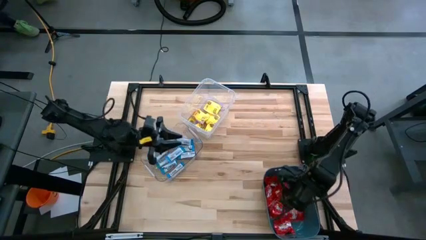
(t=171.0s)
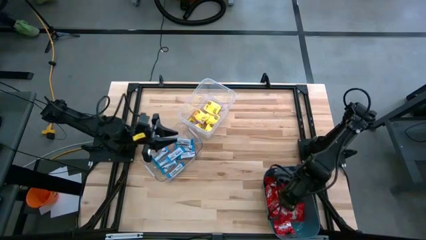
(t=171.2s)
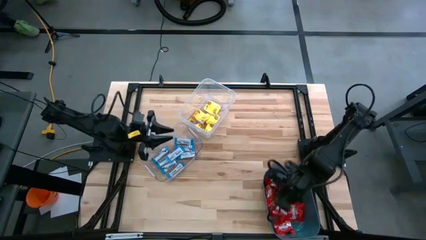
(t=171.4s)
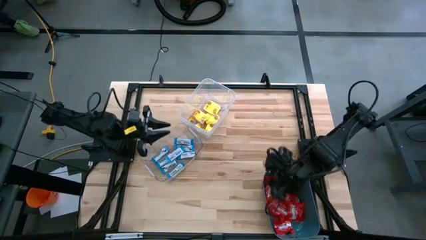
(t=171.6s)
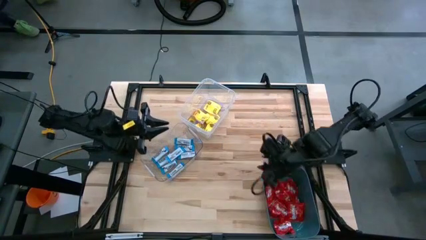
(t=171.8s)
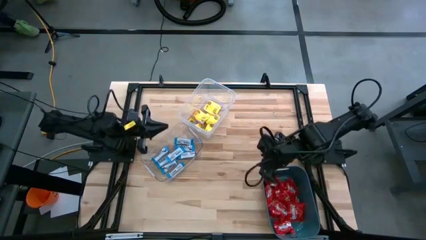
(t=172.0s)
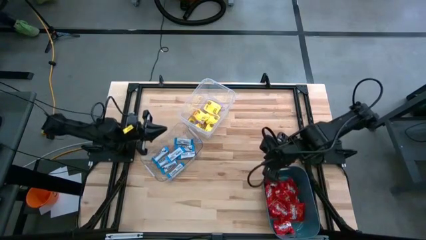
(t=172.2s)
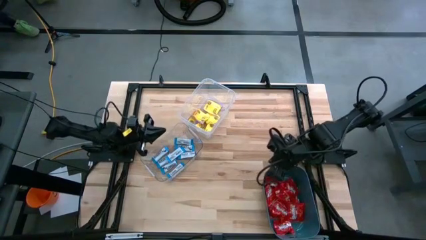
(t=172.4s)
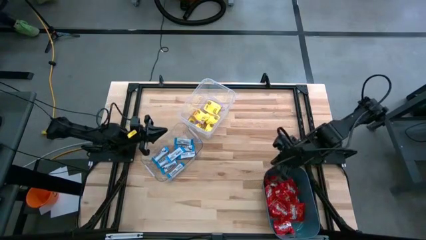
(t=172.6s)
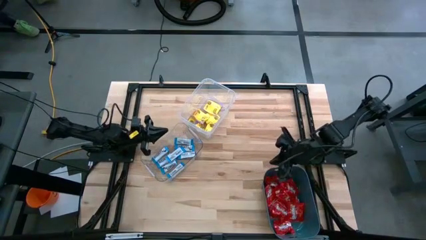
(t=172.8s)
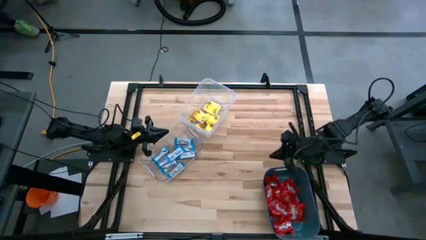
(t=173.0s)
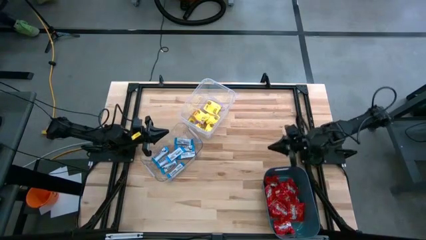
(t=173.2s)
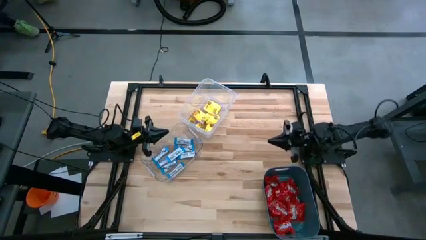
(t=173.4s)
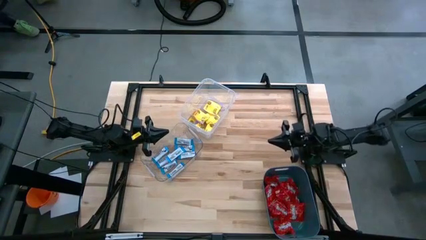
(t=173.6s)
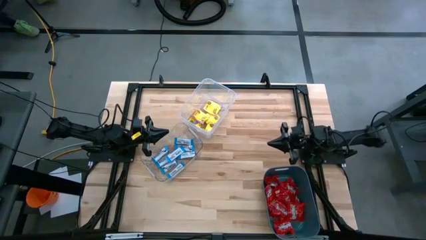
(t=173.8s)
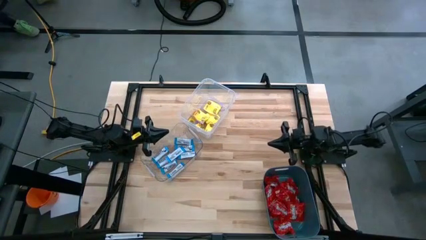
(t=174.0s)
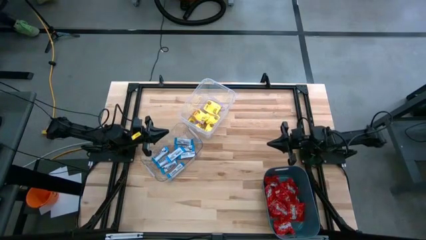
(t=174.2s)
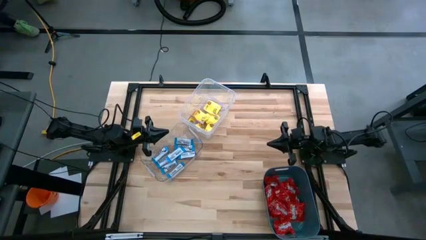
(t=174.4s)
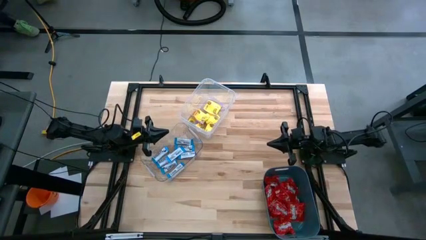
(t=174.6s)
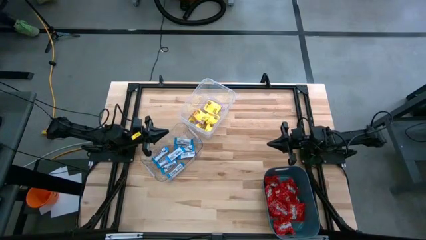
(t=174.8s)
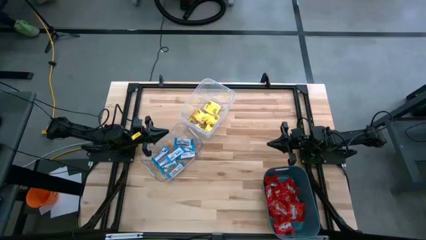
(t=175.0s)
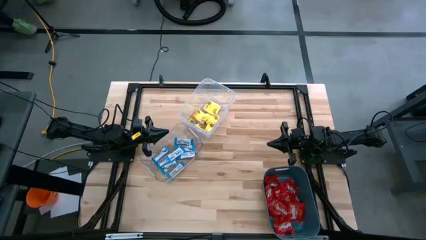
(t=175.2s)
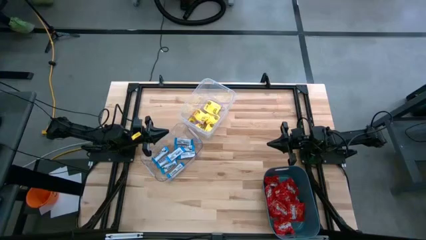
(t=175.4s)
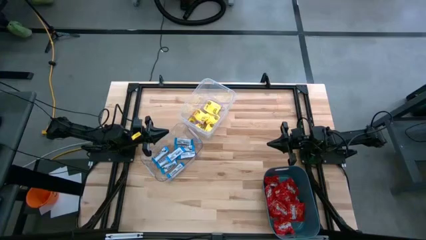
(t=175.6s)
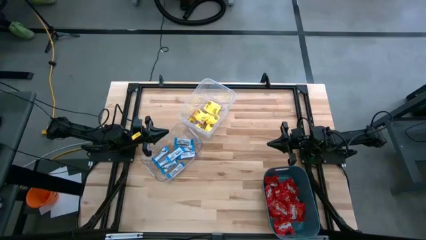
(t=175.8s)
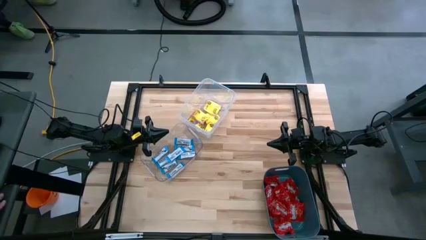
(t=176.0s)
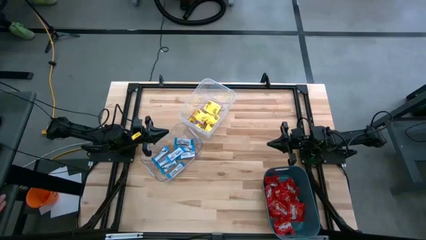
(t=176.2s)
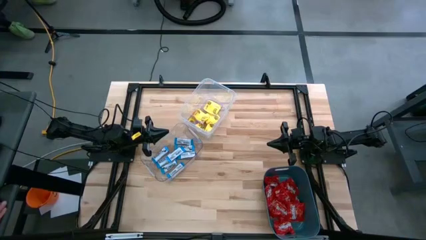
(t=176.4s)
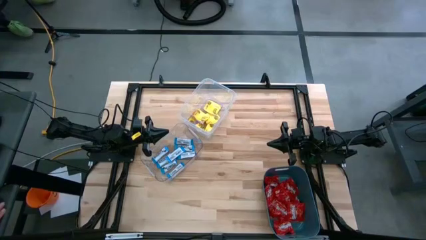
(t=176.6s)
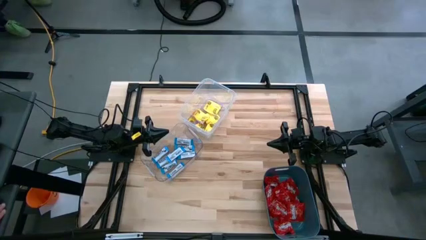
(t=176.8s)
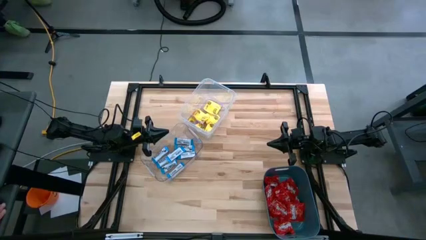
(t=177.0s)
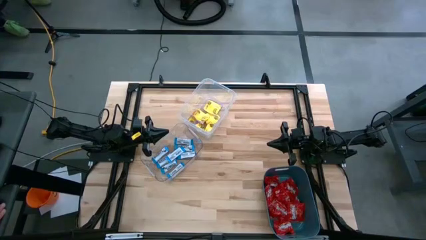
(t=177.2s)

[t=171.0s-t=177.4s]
Task: Sort candy
Return to Home Position

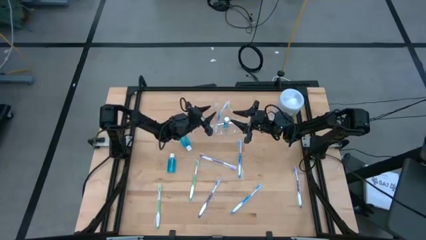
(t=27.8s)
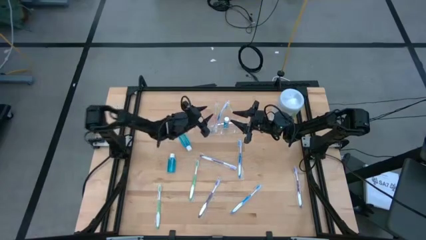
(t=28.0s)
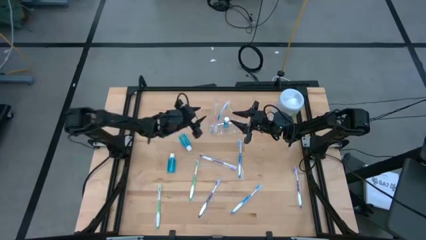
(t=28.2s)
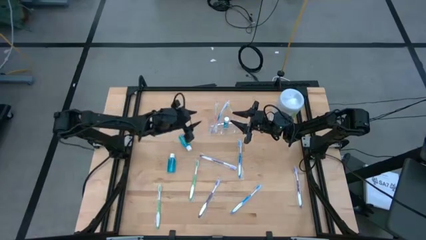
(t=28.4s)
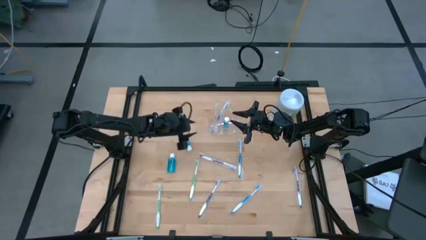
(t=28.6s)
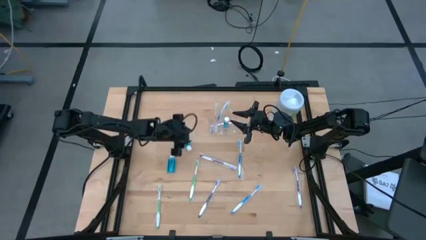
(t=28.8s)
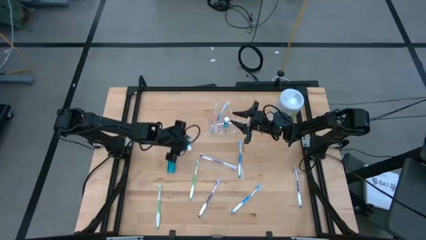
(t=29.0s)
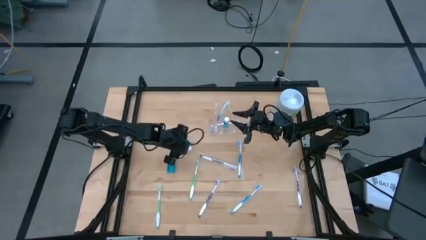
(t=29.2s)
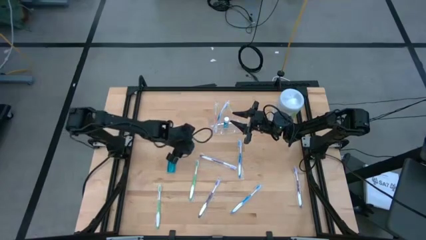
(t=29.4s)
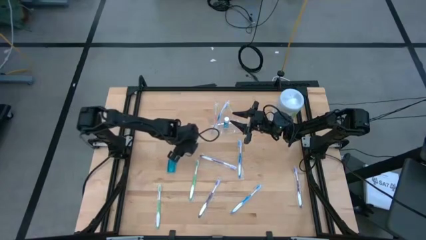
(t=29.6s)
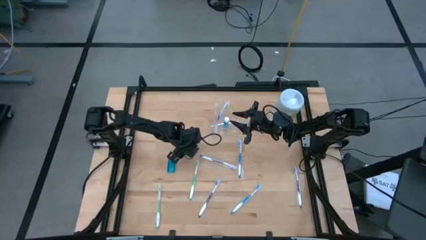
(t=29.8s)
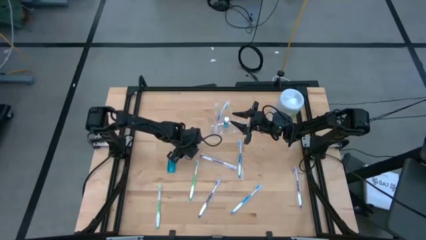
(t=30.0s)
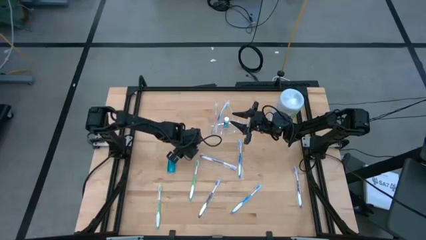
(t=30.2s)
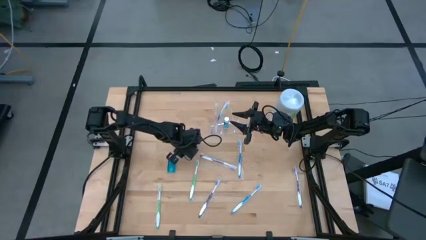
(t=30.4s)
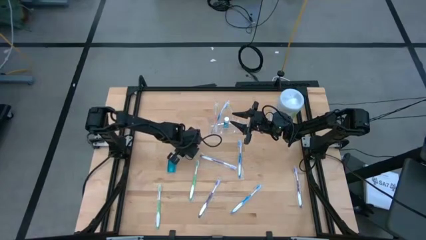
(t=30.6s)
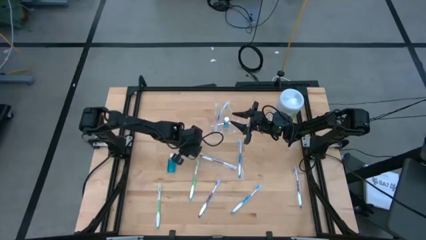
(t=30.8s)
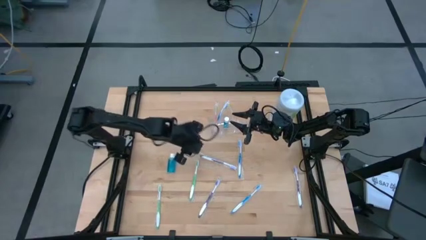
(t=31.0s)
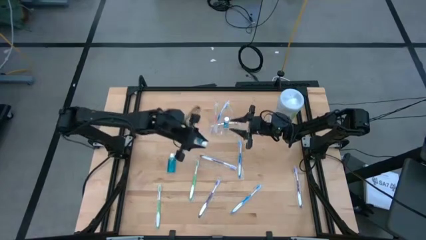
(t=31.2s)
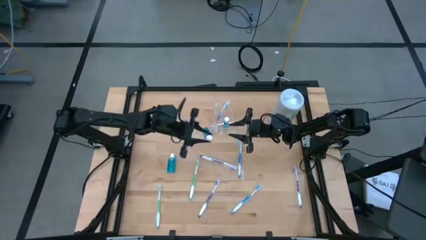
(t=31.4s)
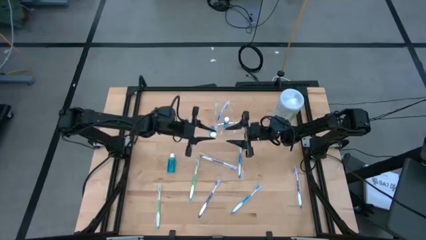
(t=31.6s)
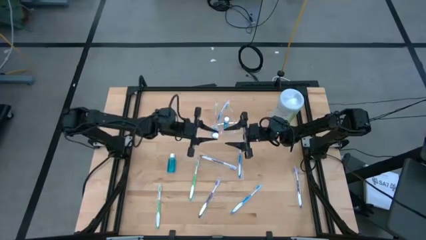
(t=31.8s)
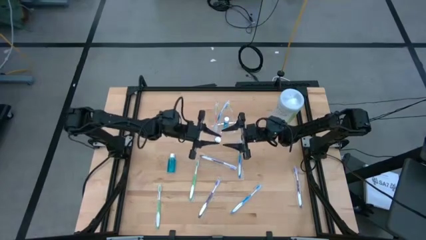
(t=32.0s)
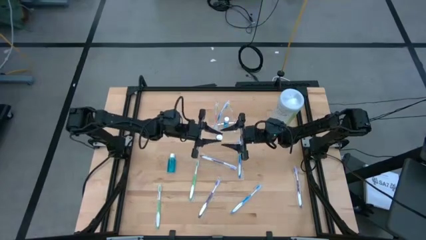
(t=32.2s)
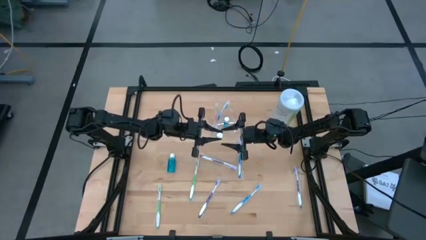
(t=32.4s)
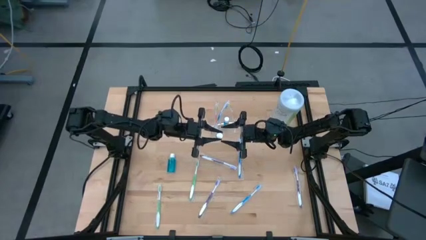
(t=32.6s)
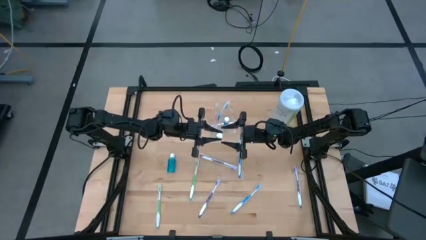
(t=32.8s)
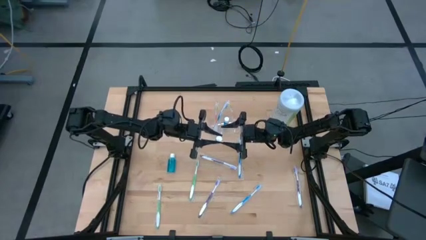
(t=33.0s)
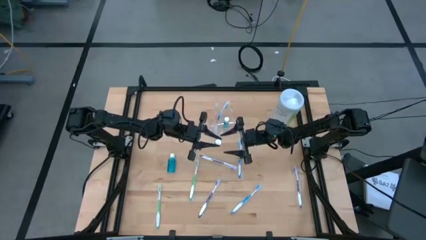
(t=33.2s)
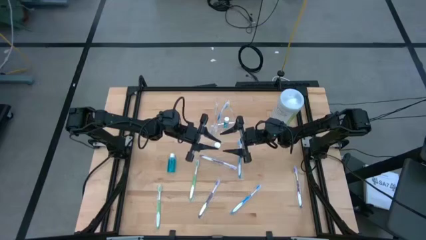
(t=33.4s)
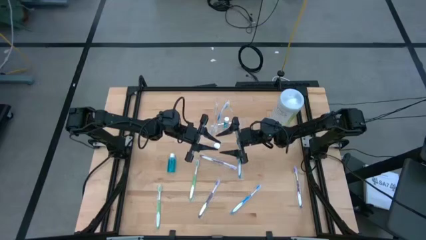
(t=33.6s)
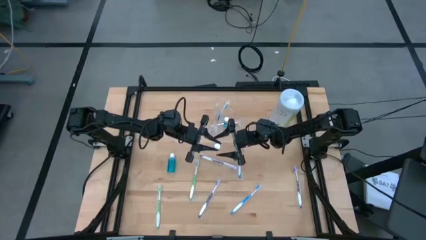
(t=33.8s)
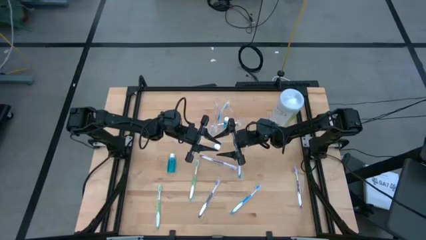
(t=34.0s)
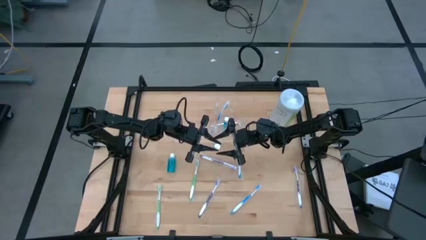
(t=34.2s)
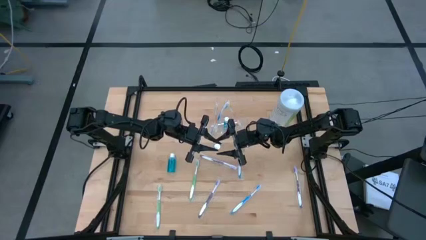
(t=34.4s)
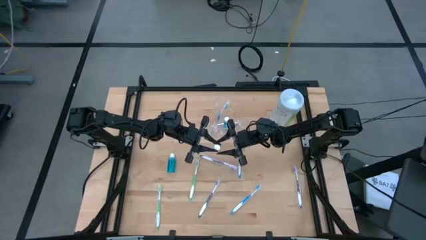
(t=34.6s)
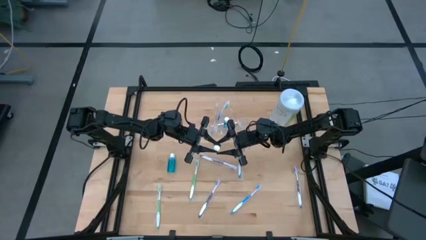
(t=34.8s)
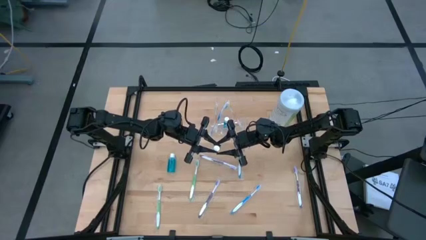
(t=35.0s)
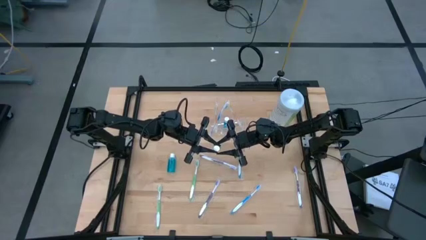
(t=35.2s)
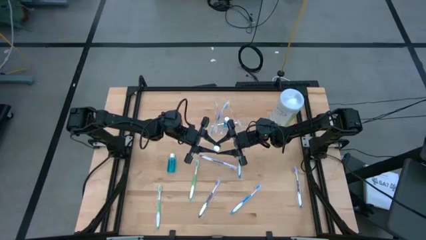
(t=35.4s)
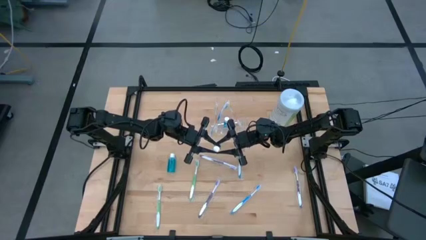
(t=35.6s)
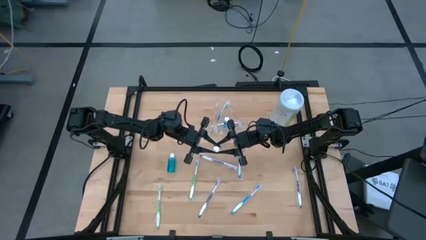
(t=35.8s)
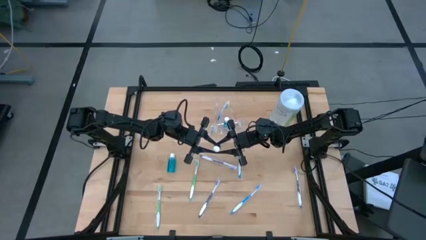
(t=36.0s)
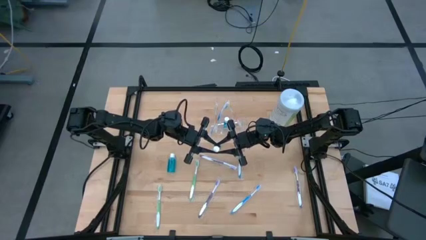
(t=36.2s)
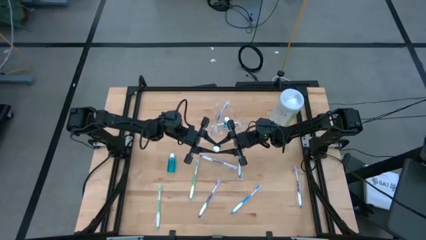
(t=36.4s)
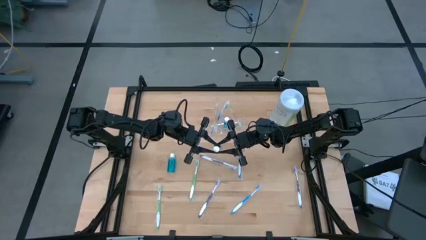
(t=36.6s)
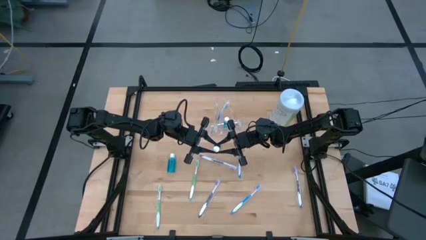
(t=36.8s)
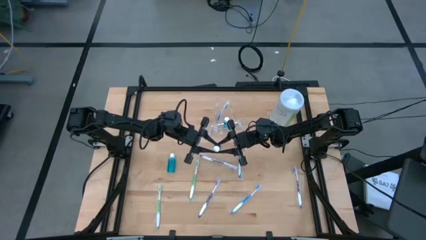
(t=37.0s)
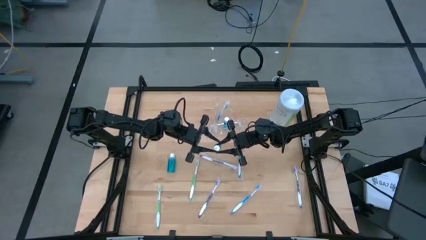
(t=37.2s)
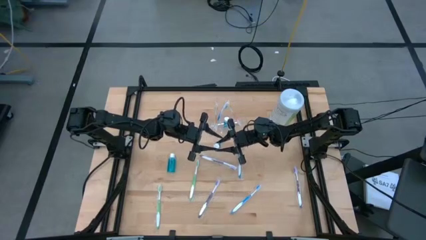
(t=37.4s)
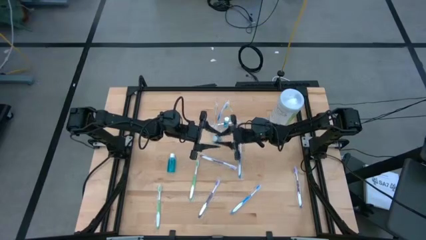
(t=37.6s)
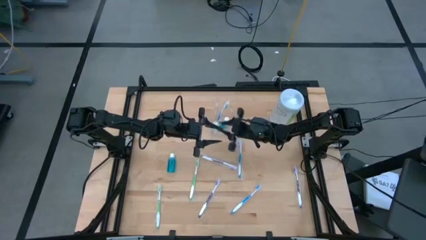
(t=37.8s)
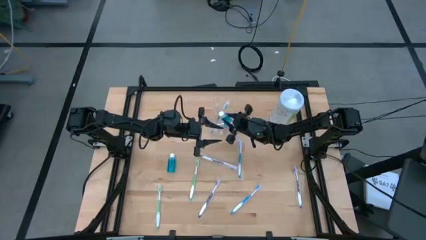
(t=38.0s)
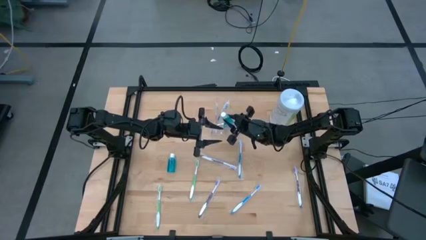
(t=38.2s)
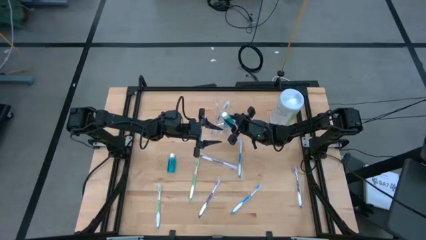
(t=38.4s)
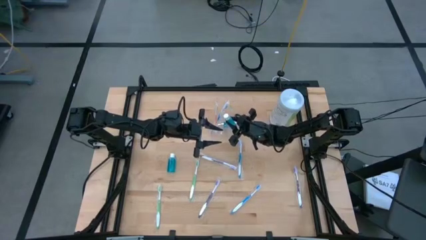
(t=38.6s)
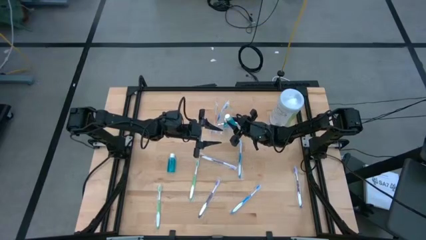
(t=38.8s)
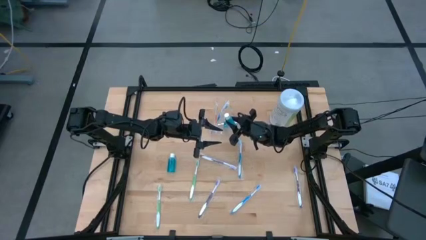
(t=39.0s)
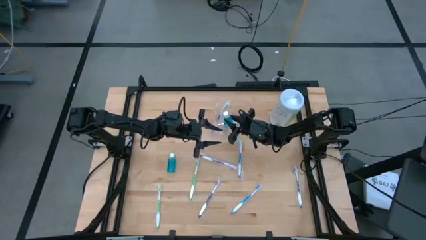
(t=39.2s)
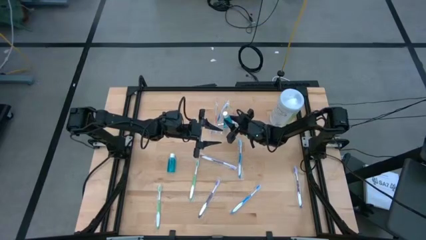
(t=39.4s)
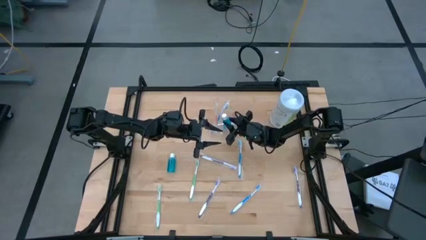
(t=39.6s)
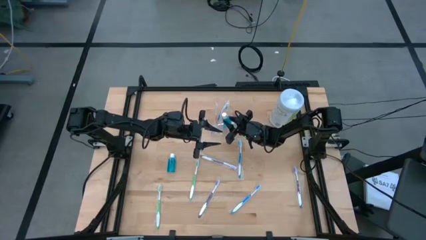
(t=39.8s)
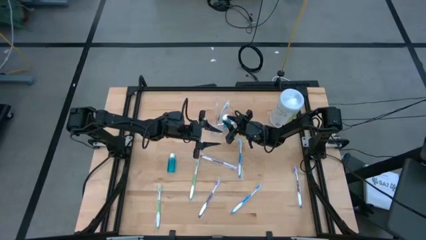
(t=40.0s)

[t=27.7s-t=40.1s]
Task: Pick & Place toothbrushing station
Put the top blue mouthwash into the transparent organizer
